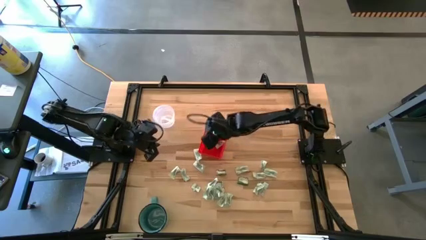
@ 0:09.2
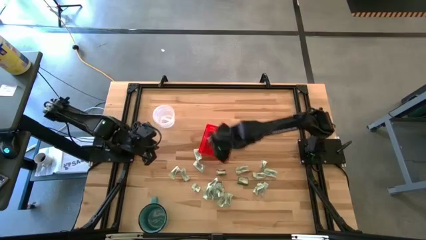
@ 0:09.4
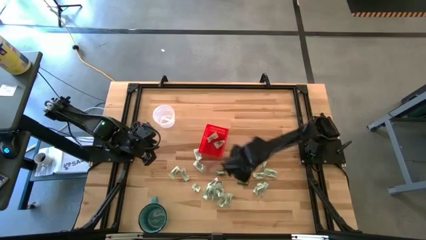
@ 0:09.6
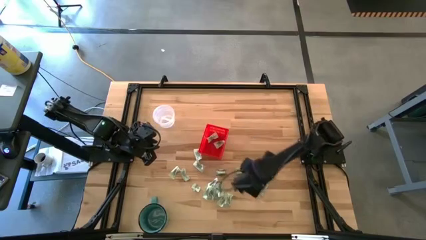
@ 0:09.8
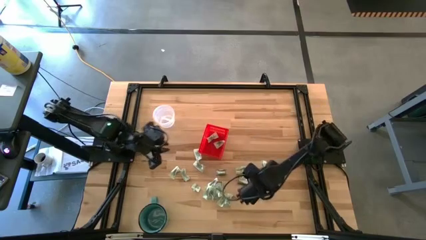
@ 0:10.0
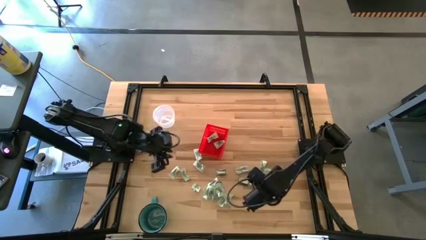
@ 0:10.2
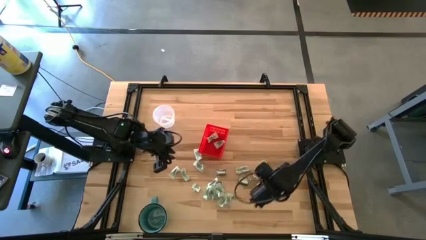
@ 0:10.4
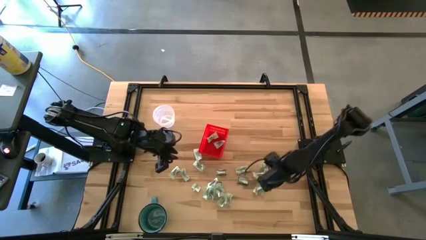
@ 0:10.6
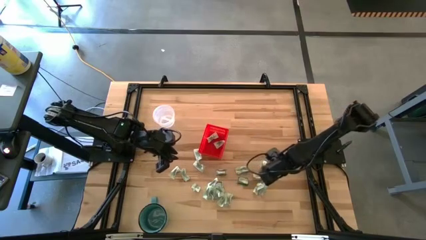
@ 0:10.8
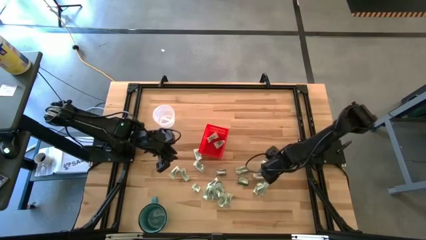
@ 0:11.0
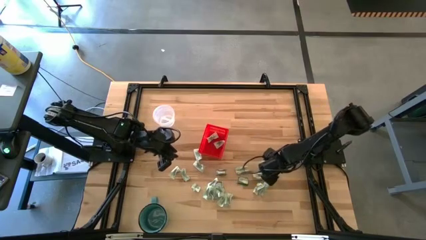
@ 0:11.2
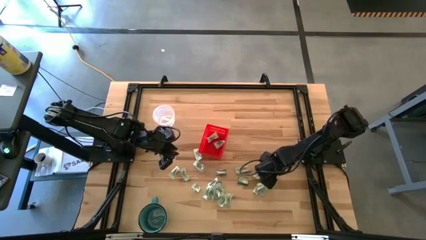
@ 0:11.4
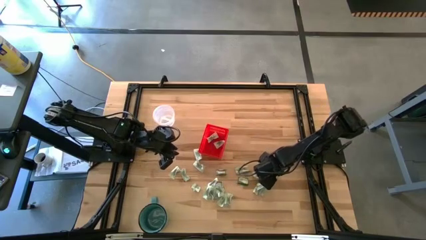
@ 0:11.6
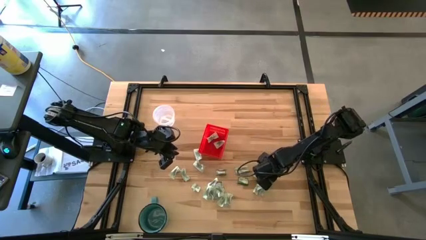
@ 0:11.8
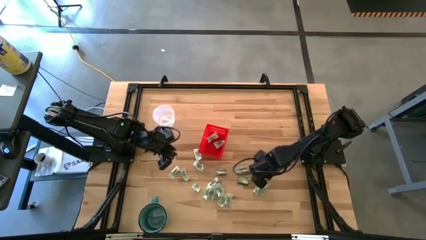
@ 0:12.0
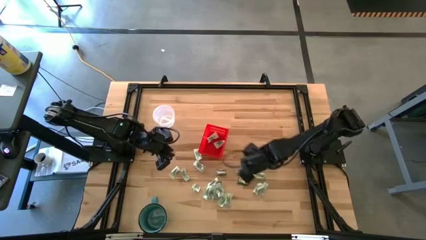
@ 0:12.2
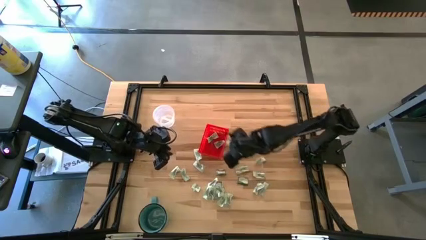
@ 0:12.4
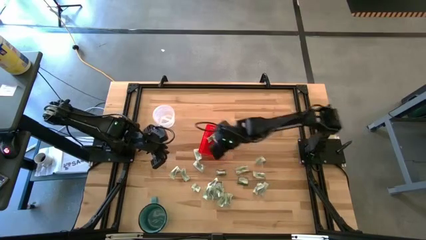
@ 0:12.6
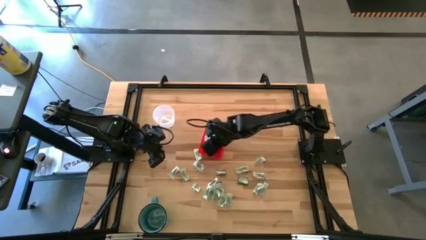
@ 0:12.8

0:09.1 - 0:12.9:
Task: Pick and place Stevia / Truvia into bins
Put the stevia packet into the red basket

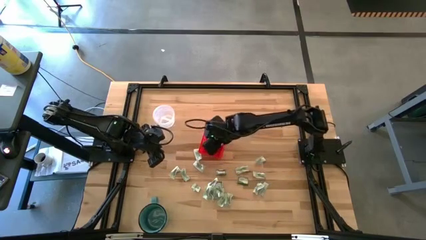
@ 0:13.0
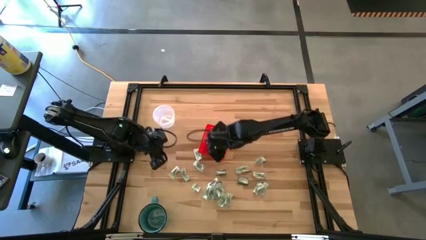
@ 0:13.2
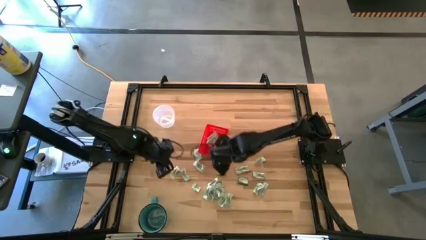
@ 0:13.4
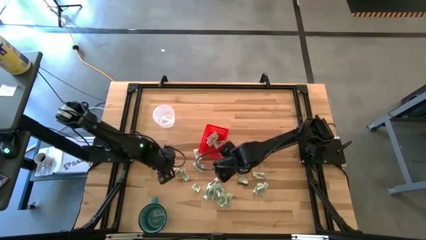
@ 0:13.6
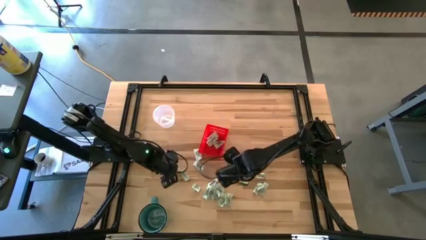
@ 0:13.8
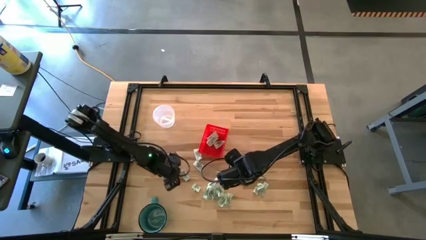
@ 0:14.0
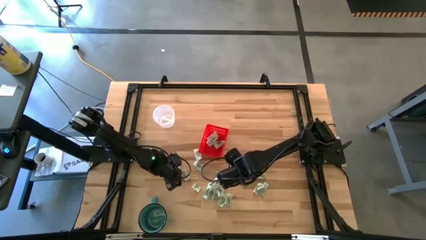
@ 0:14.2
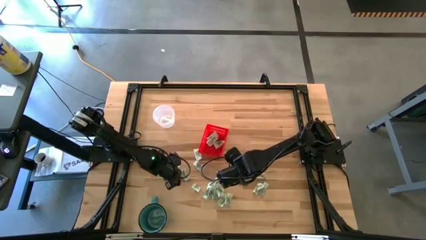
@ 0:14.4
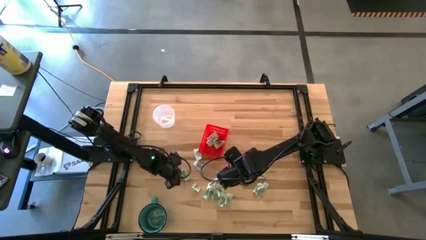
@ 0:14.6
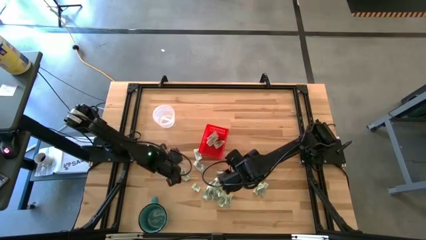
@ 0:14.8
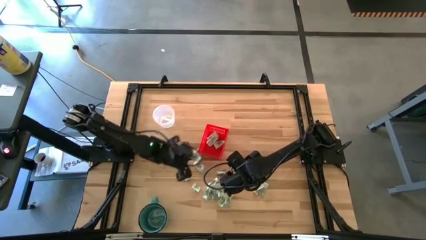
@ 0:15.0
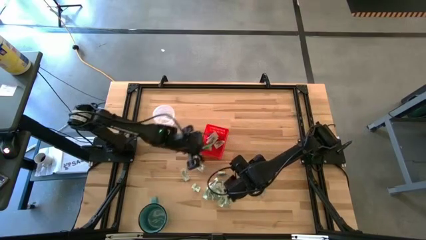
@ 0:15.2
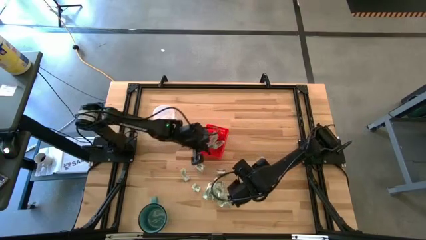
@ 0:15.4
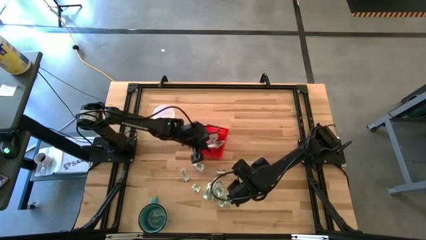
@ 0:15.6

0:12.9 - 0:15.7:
Put the stevia packet into the red basket

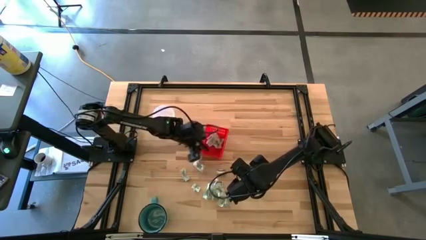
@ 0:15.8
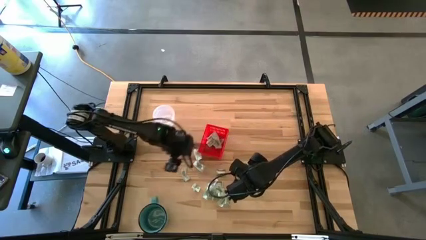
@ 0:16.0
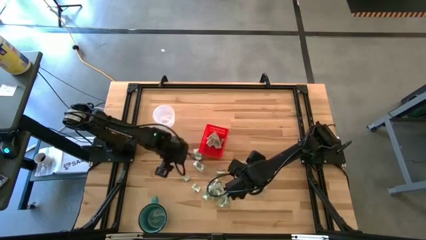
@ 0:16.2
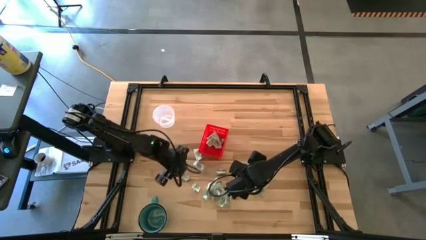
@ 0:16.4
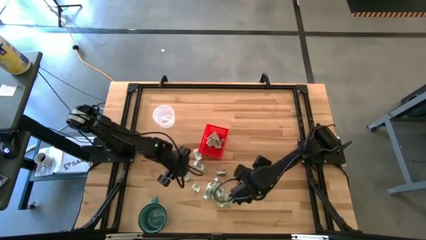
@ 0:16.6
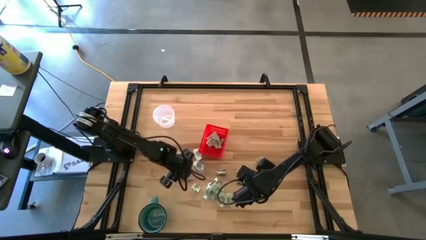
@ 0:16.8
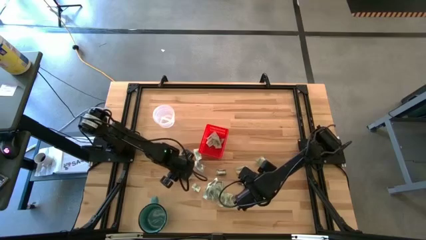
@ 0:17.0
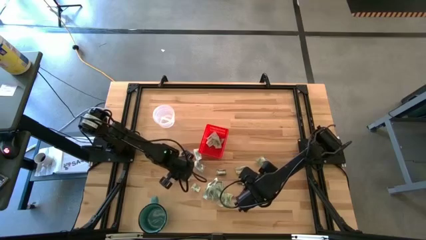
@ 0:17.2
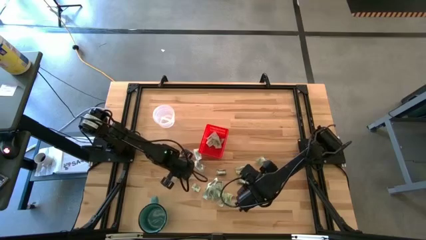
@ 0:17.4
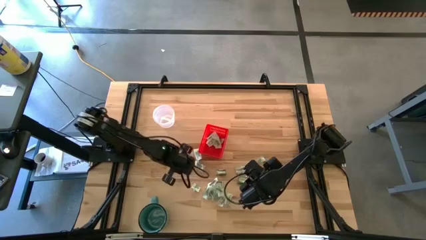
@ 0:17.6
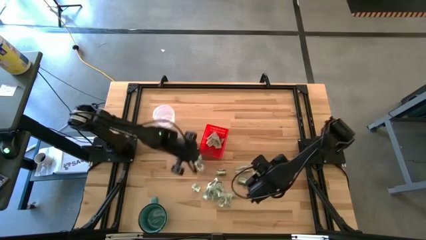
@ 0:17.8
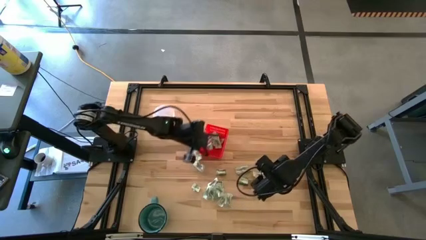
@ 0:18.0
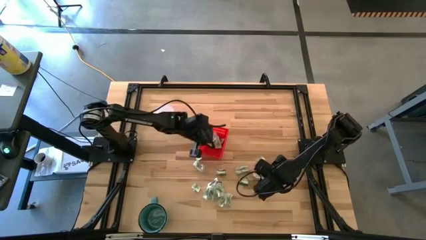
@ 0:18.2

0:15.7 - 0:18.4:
Put the stevia packet into the red basket

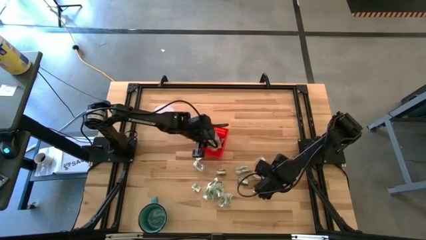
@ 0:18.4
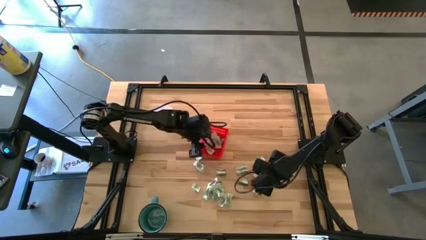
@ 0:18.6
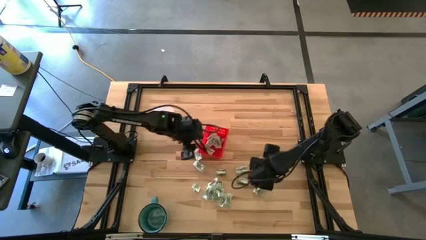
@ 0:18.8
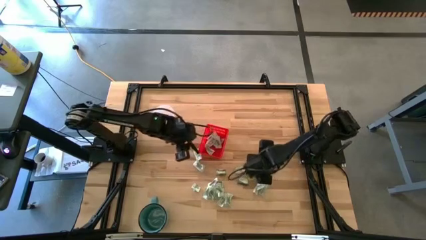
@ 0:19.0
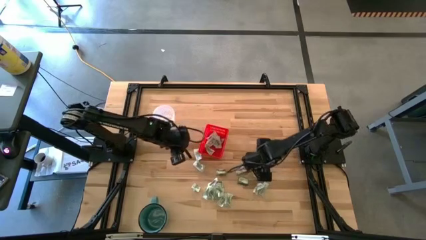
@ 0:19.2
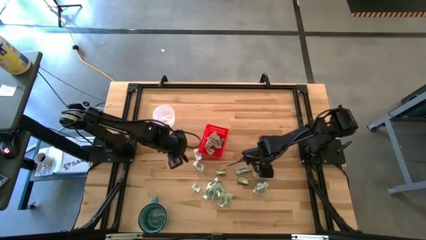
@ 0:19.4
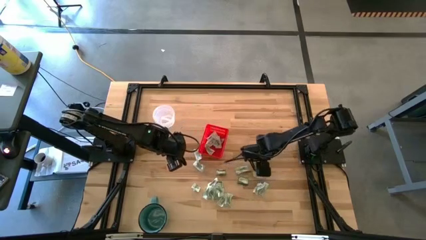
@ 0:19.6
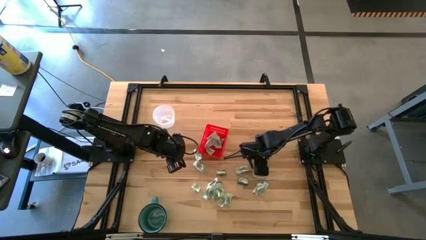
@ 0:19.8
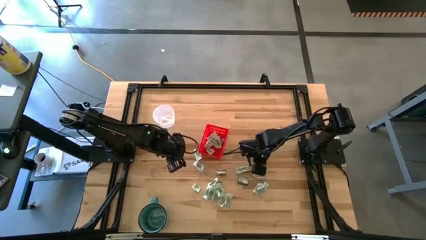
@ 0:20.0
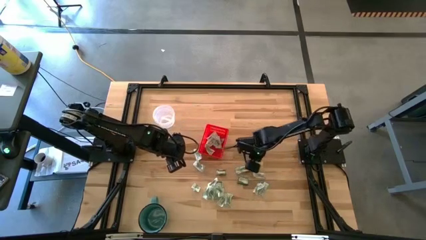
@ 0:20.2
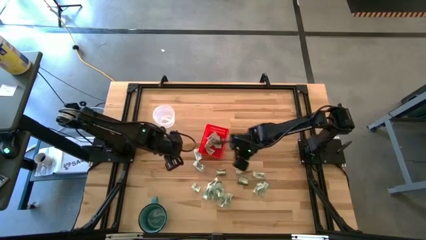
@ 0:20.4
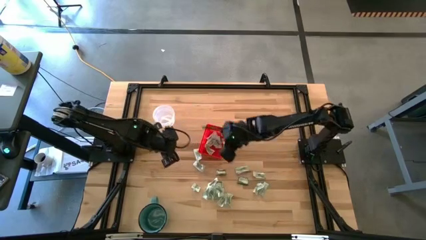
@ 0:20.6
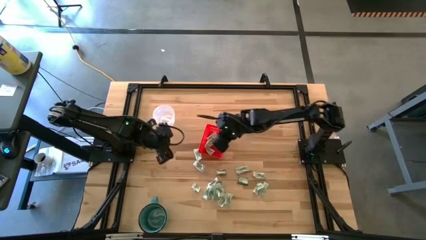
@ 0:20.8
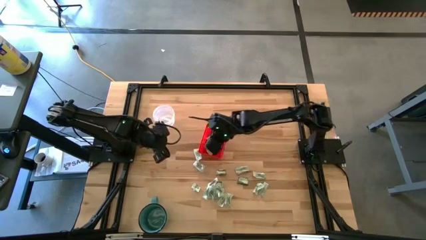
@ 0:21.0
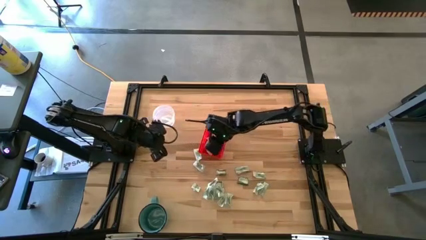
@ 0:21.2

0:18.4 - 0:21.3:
Put the stevia packet into the red basket

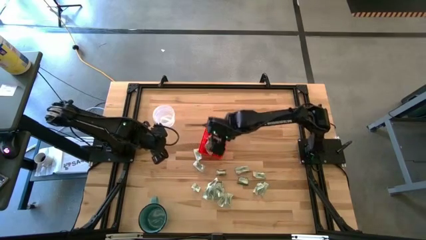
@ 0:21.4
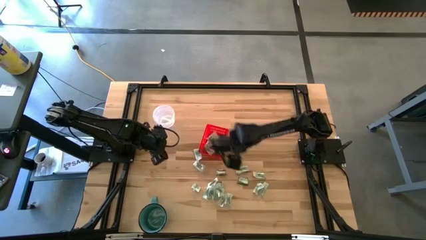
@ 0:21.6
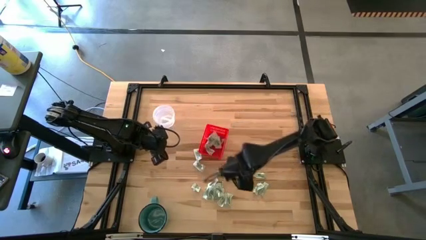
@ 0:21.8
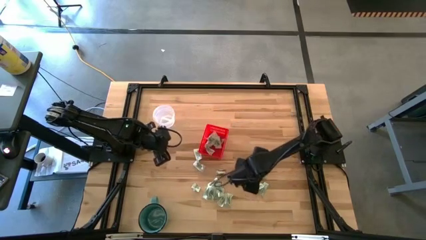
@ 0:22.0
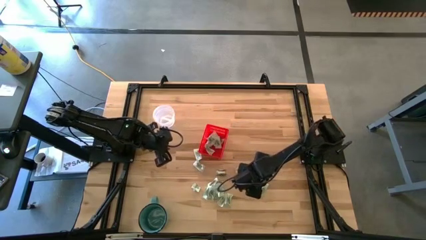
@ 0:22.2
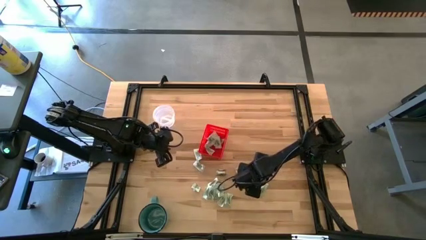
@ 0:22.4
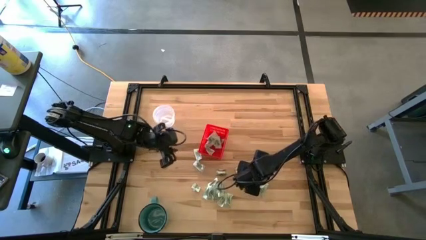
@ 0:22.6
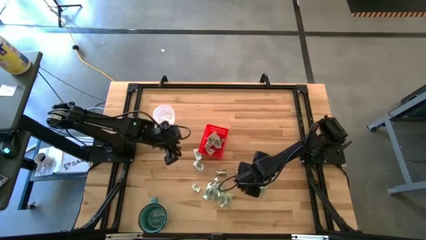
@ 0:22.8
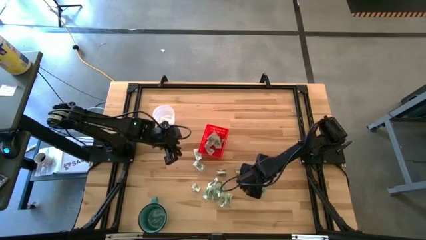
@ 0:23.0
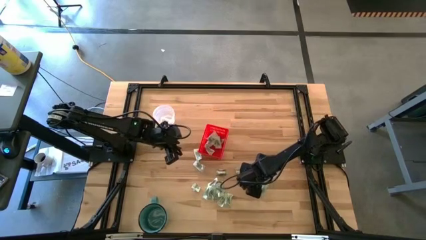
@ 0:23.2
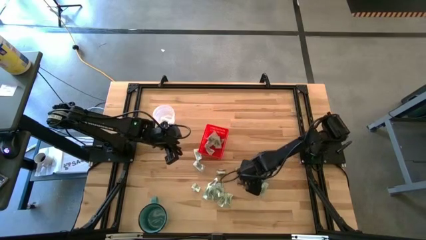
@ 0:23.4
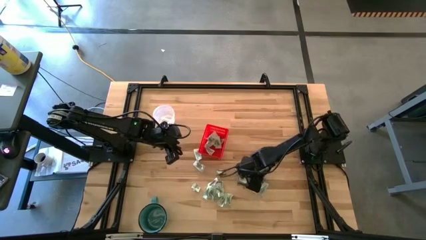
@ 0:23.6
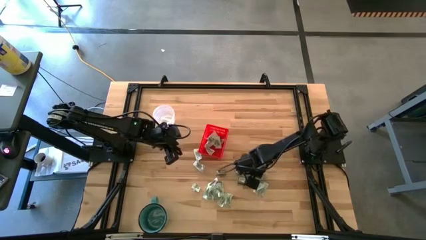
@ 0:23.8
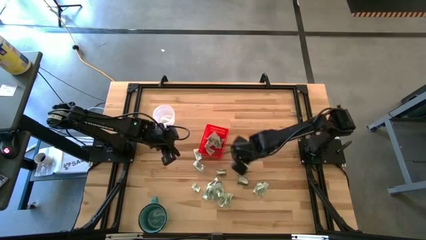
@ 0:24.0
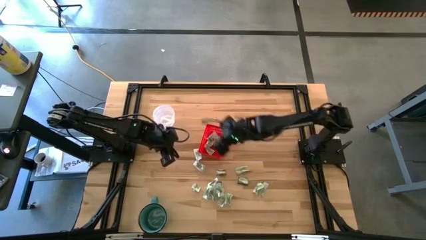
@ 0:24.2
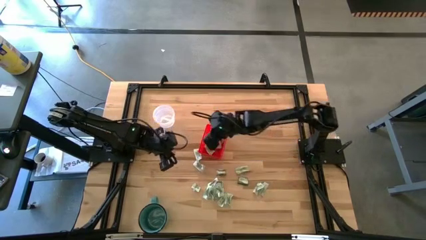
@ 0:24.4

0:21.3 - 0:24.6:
Put the stevia packet into the red basket

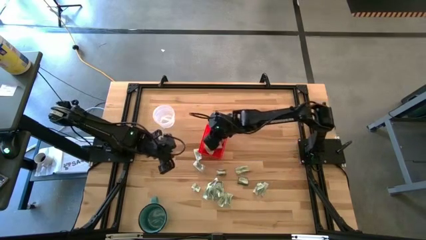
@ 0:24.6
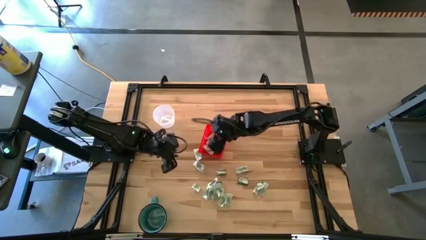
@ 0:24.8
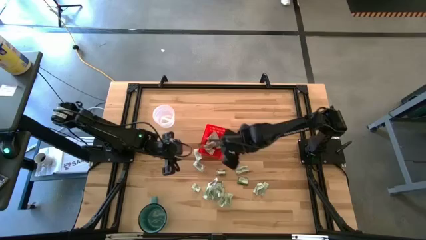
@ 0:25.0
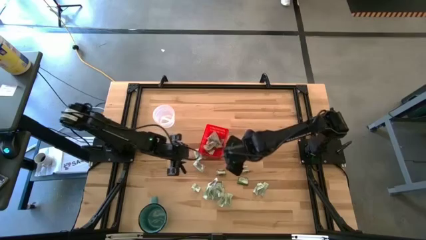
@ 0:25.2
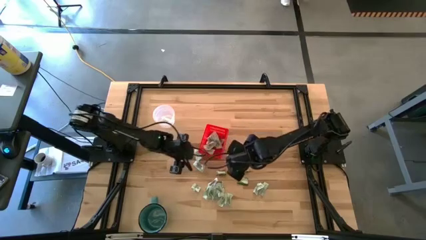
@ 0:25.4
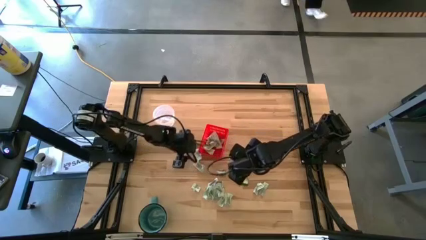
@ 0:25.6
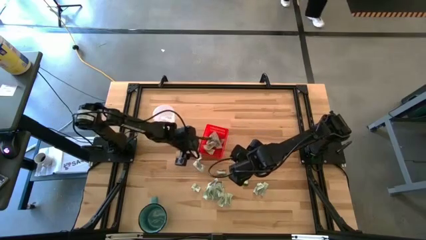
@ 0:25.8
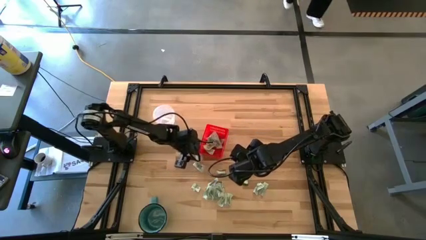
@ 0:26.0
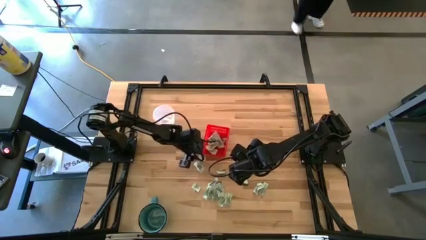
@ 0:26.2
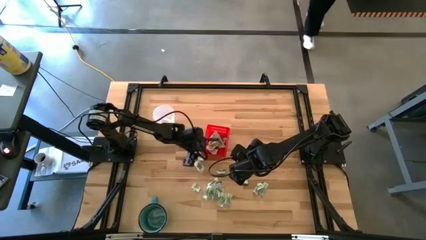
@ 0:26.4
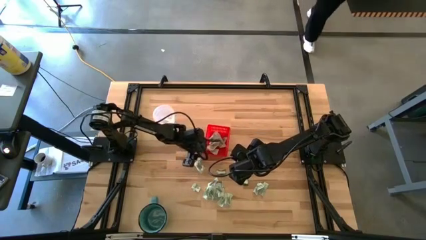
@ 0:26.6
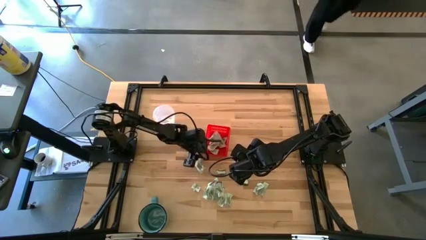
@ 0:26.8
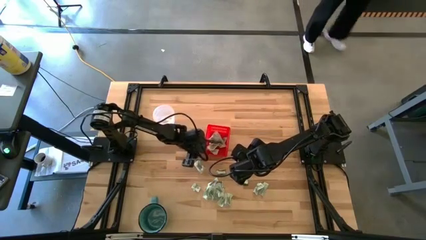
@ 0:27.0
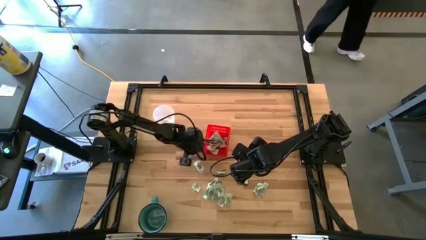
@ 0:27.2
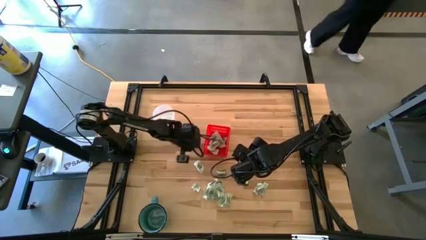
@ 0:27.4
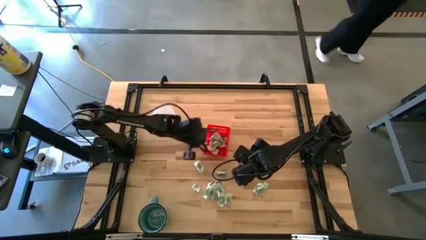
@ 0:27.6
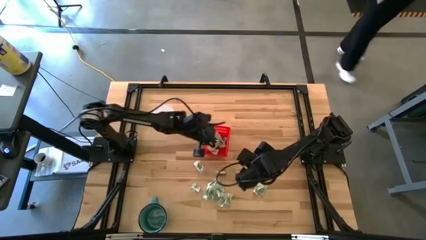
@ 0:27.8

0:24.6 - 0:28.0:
Put the stevia packet into the red basket
